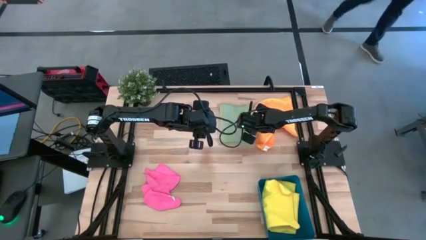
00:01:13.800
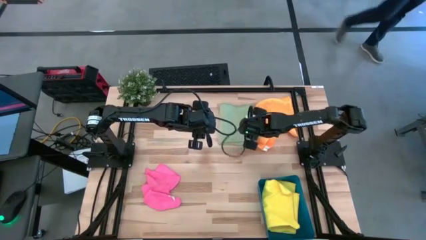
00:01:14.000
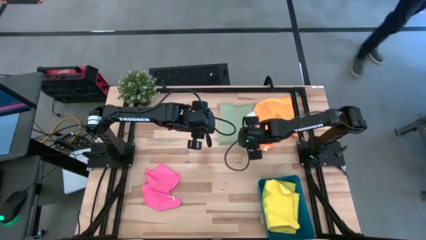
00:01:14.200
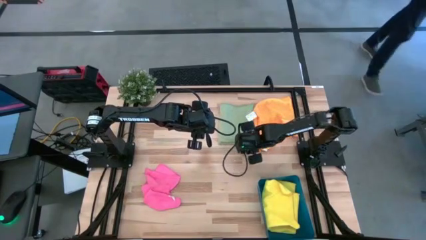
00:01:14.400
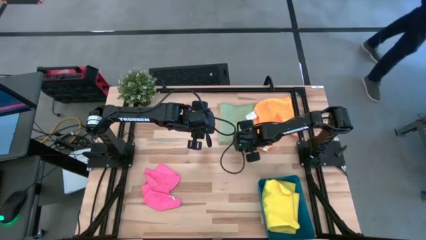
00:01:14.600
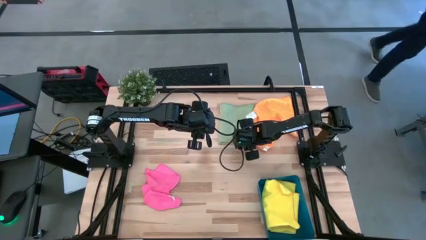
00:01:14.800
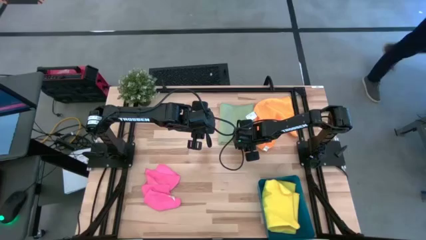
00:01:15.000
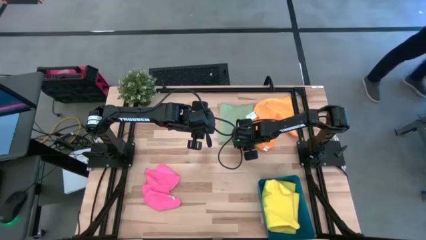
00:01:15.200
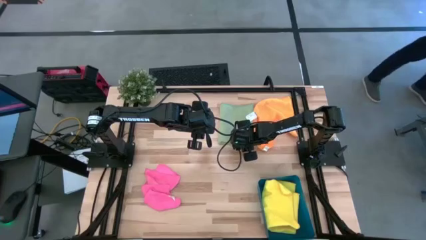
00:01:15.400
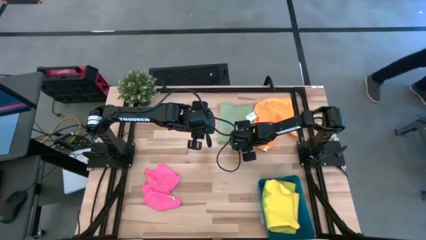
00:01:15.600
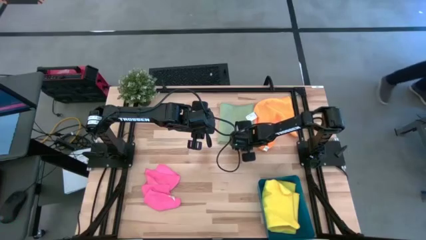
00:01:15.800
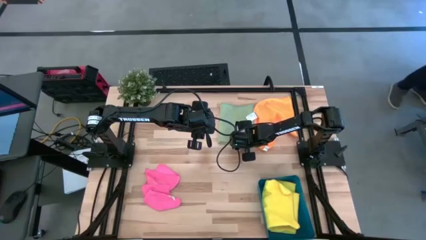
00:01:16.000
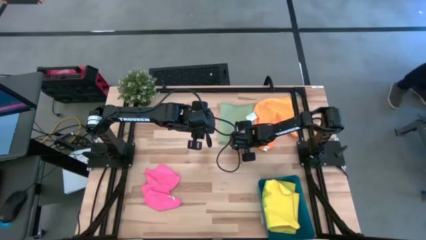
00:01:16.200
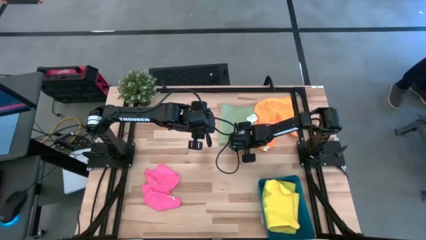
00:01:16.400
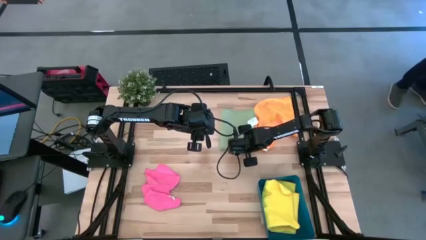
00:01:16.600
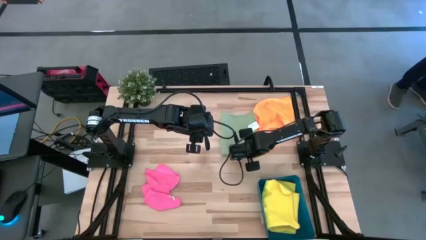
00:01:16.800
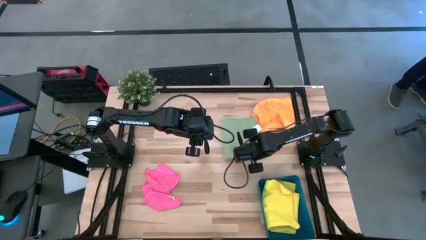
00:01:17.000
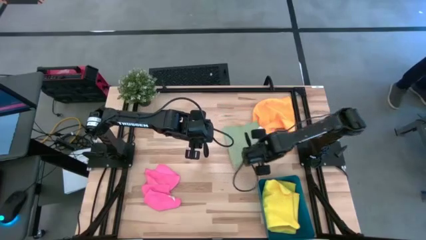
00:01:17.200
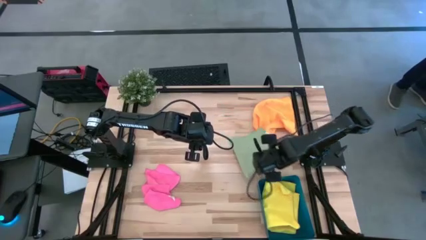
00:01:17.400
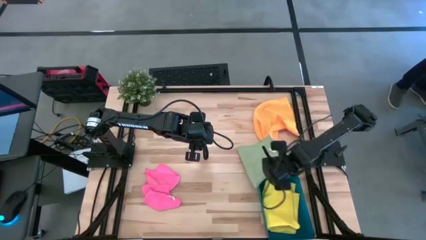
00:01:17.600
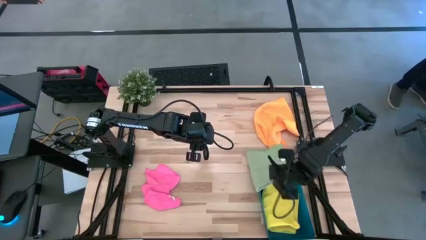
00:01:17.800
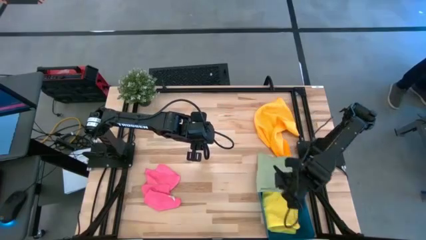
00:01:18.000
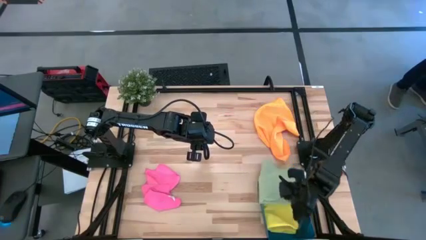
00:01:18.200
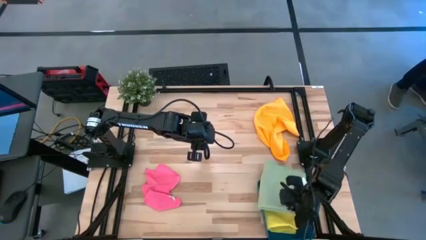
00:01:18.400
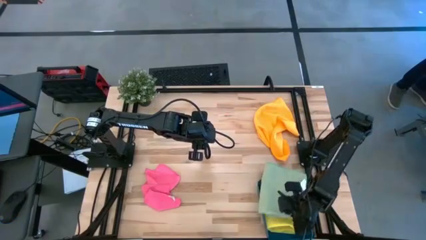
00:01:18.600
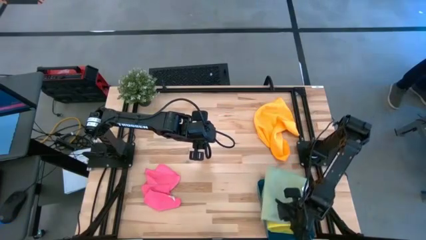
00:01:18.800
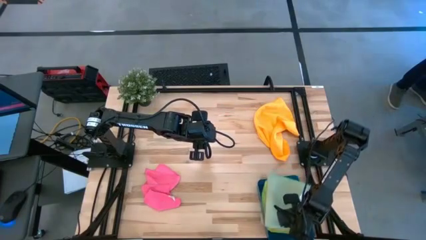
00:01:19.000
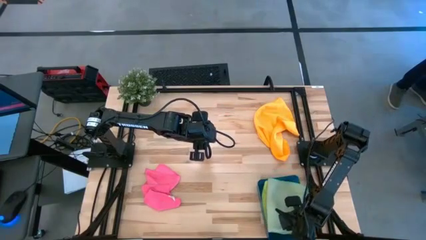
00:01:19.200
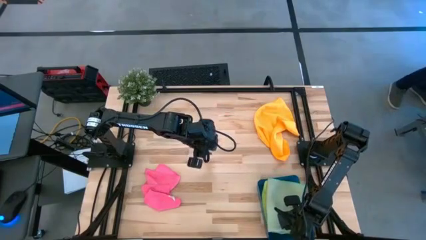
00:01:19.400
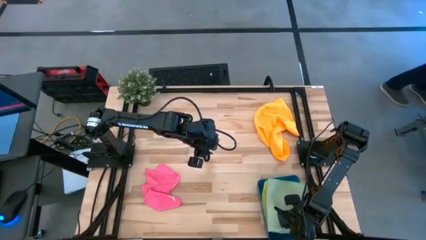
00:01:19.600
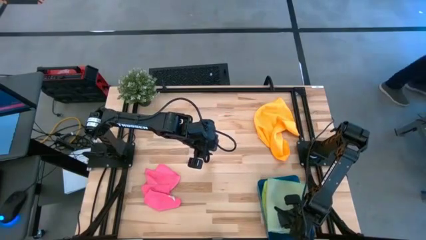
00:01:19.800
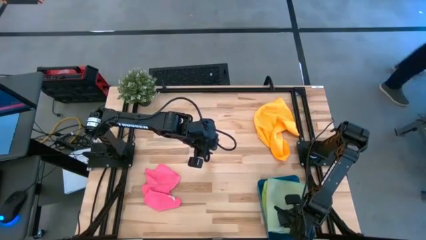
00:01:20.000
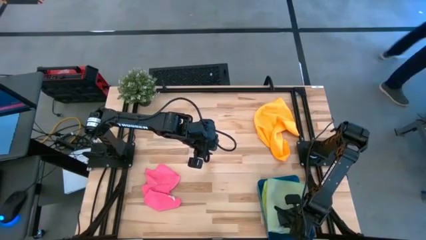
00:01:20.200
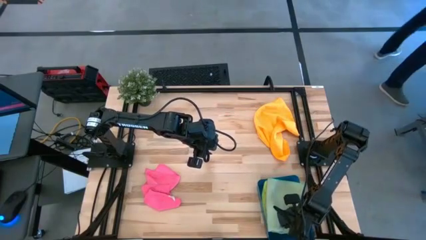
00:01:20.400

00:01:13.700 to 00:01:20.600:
Task: Fold microfiber towels
Put the folded green microfiber towel into the blue bin

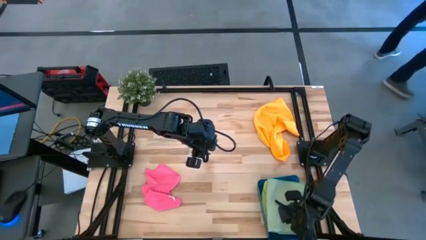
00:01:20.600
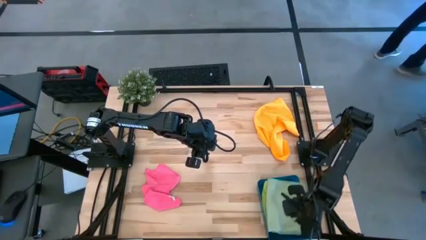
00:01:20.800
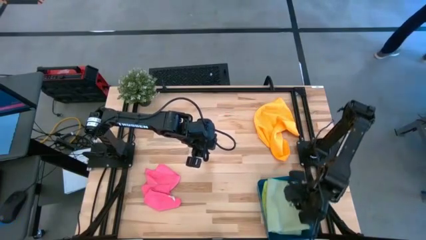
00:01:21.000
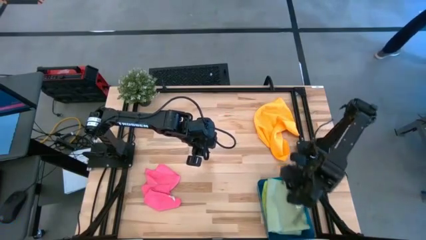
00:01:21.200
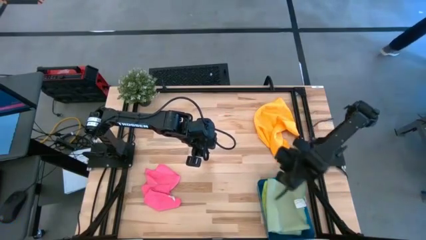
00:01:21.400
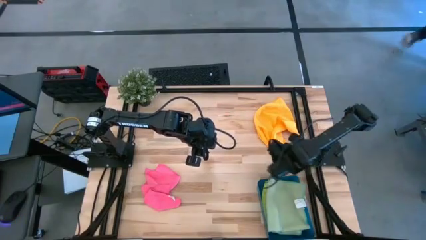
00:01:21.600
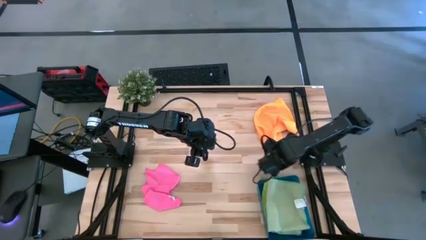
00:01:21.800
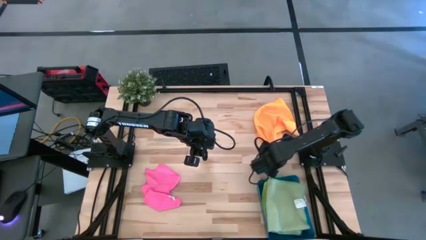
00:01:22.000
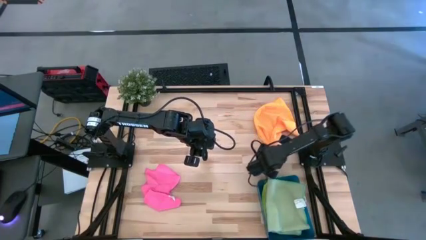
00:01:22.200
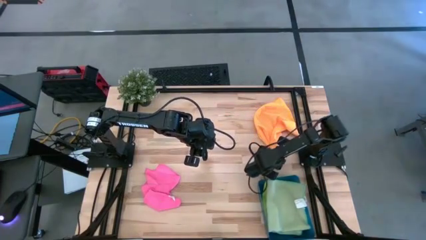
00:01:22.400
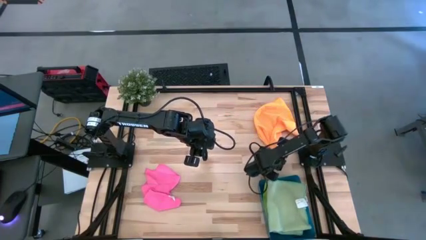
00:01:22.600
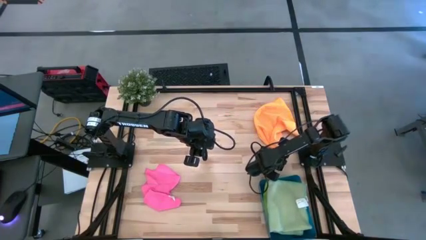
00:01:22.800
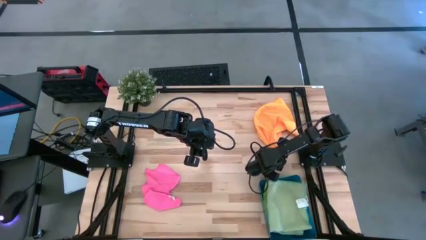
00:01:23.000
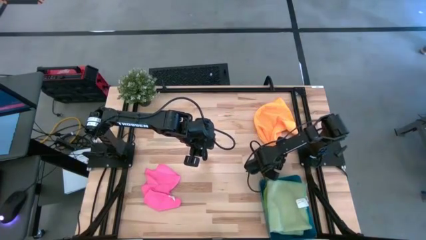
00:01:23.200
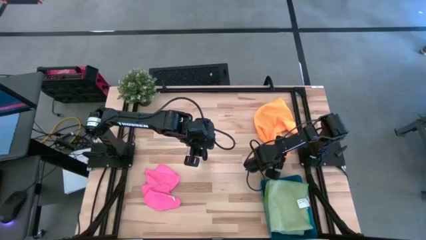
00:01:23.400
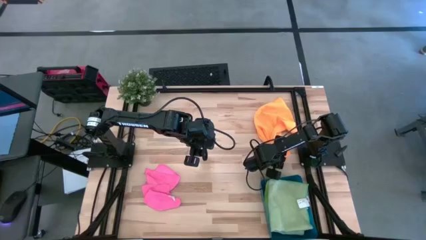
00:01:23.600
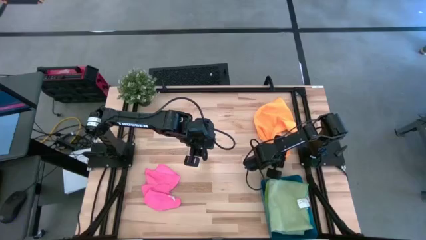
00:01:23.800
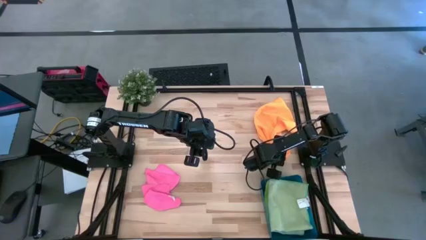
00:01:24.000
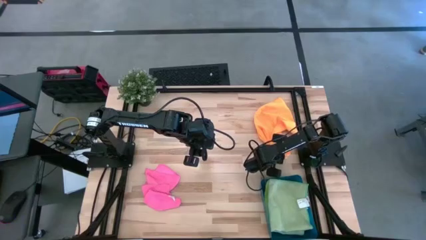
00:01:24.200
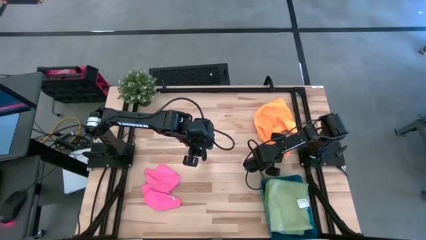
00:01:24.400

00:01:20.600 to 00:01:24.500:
Fold the orange microfiber towel

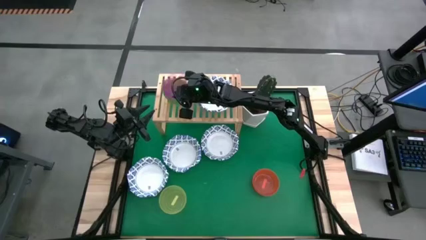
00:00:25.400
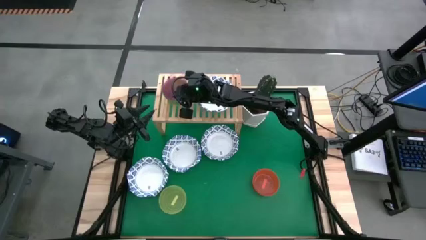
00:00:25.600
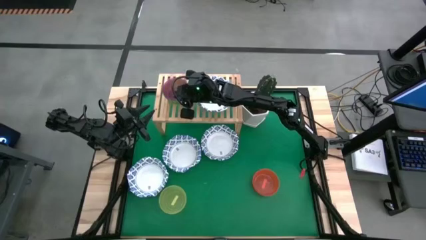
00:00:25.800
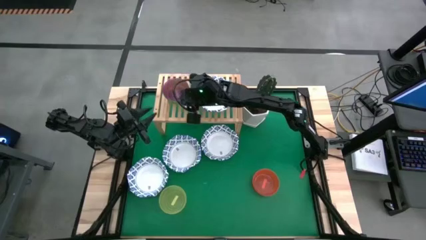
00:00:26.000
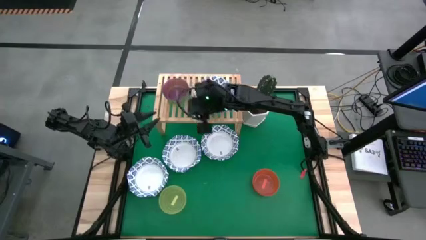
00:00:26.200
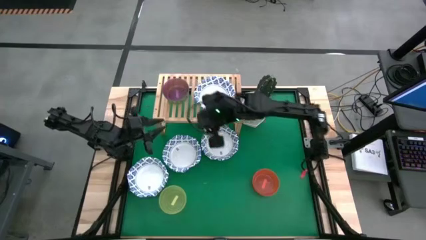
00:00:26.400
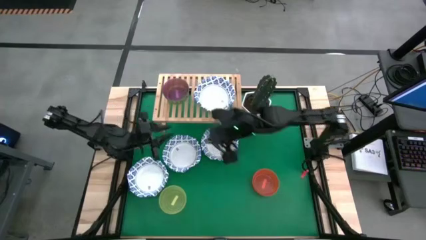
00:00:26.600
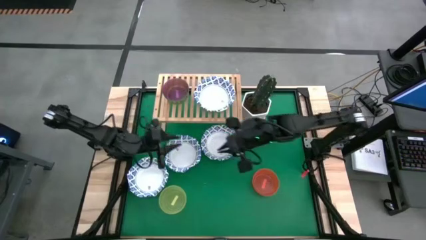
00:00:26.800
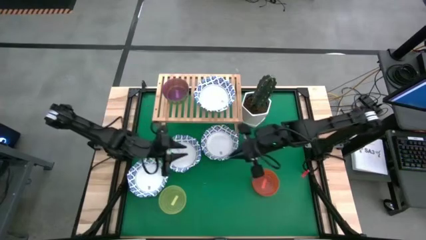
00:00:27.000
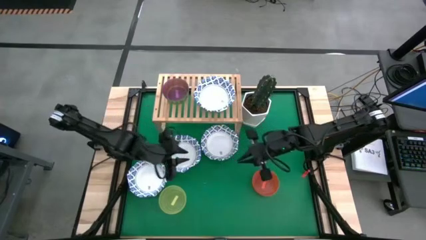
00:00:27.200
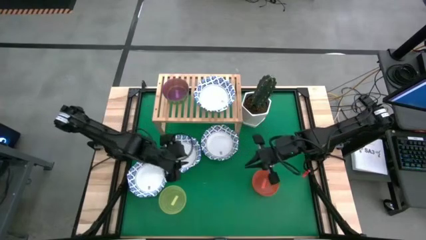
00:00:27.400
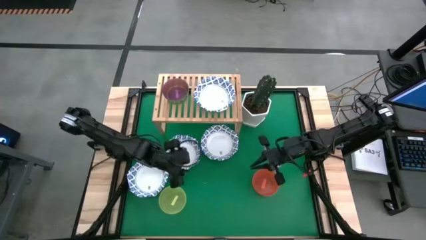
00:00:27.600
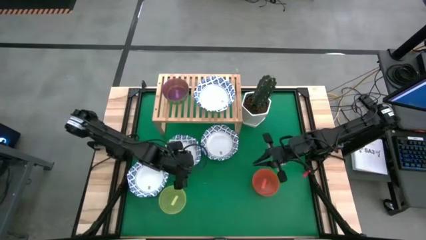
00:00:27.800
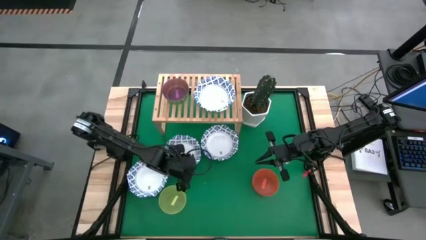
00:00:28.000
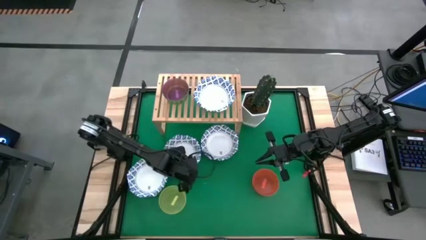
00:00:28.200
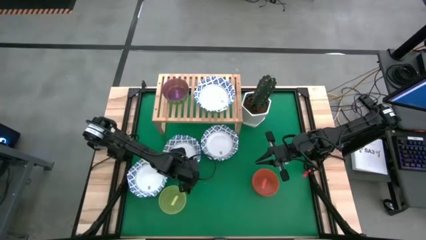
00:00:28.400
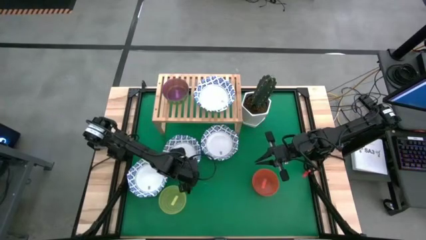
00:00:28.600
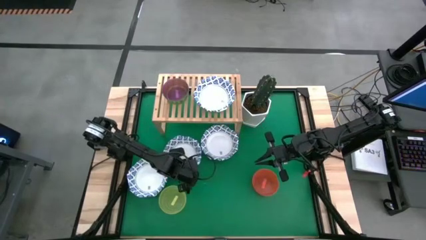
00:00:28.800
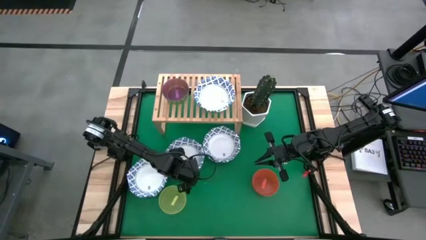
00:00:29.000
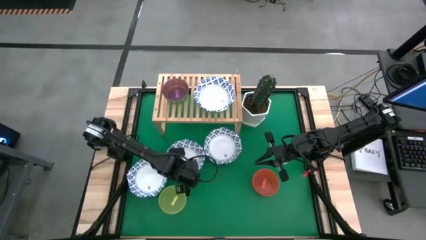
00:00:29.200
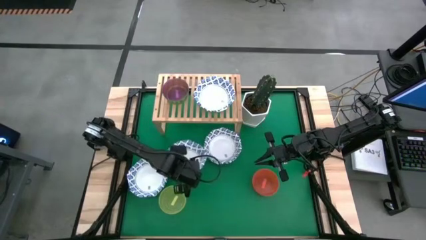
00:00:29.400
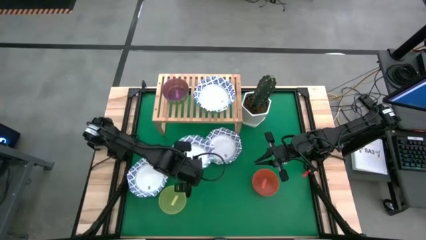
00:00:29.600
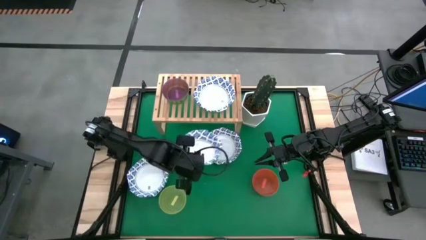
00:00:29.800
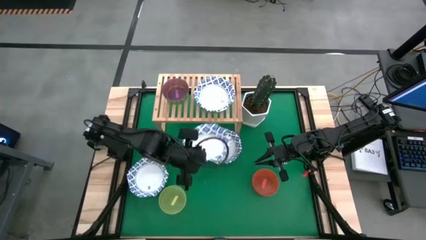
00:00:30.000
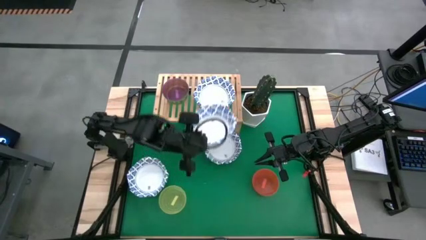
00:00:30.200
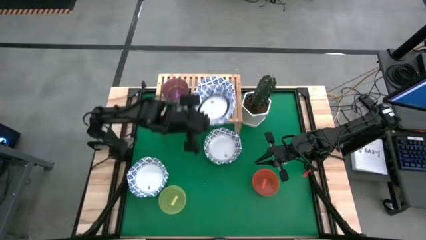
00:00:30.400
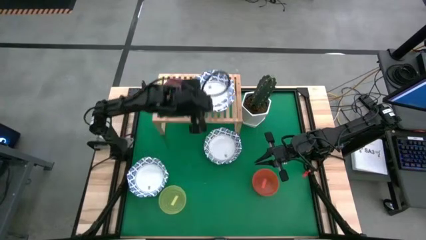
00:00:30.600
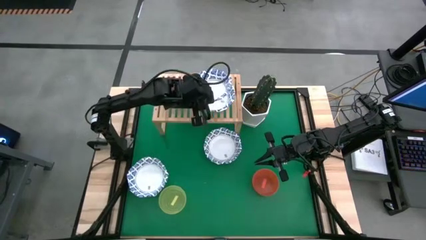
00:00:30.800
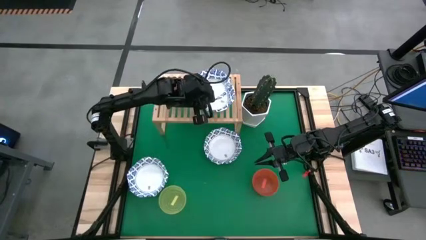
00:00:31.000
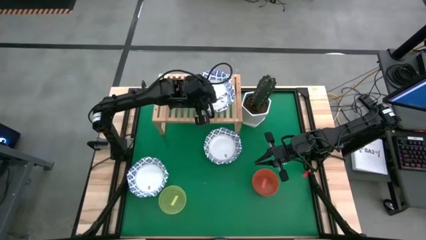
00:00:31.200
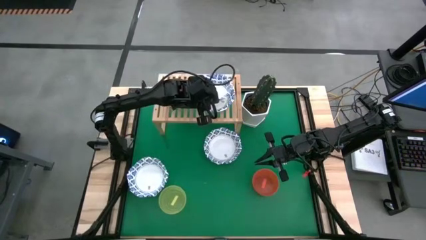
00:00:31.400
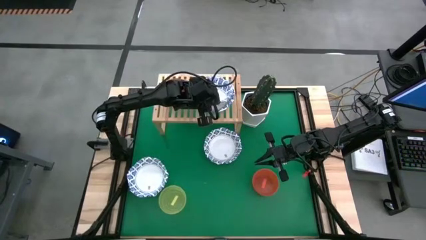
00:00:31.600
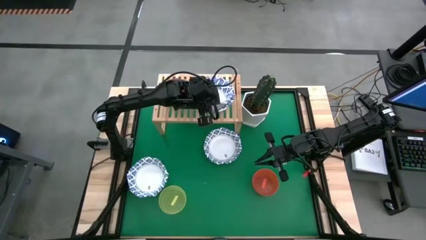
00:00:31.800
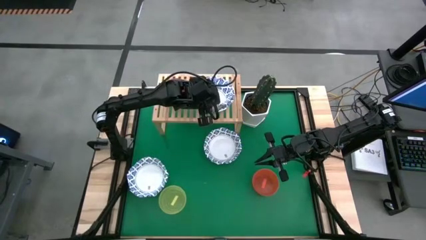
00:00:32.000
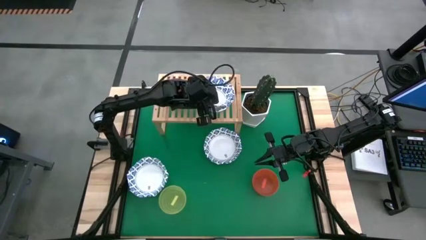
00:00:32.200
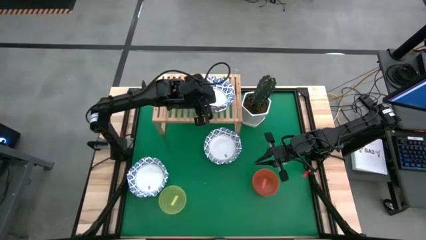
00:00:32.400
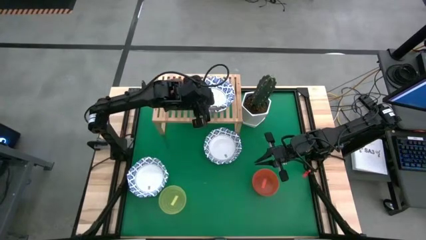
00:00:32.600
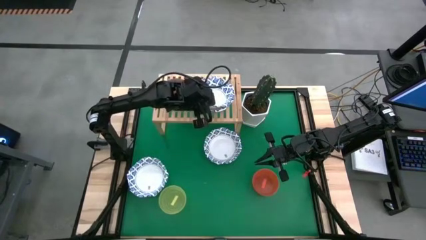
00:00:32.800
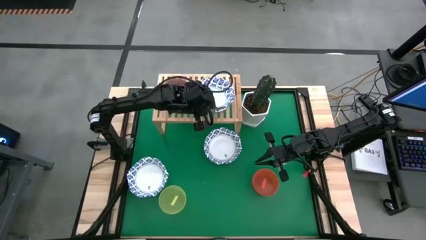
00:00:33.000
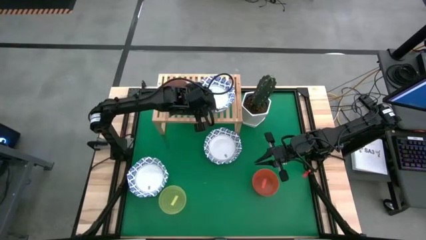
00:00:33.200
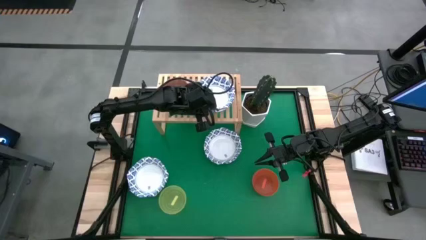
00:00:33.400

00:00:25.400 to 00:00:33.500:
Task: Place and stack bowls onto a shelf
Stack the middle white patterned bowl on top of the white patterned bowl on the shelf
